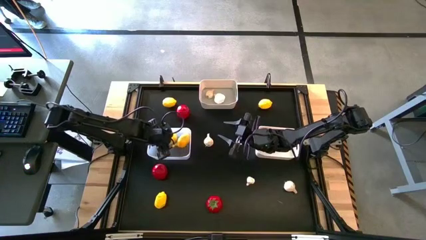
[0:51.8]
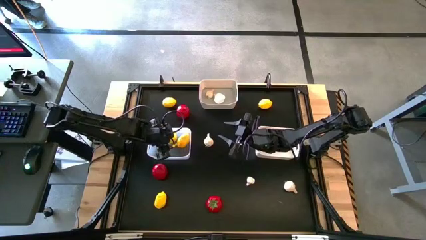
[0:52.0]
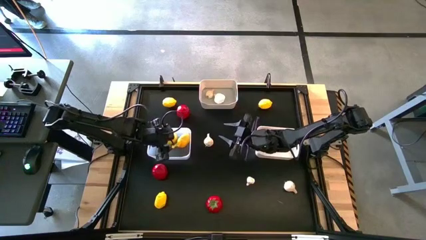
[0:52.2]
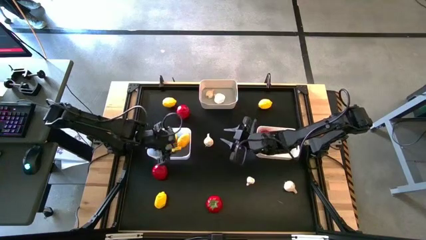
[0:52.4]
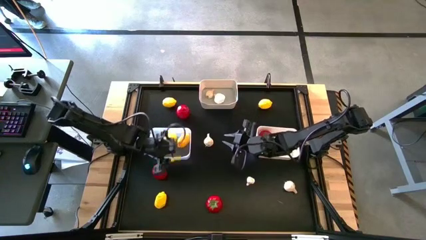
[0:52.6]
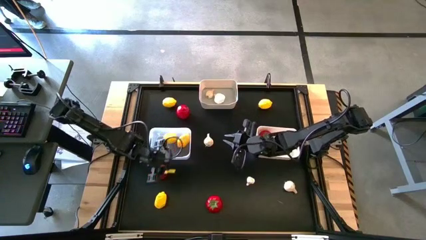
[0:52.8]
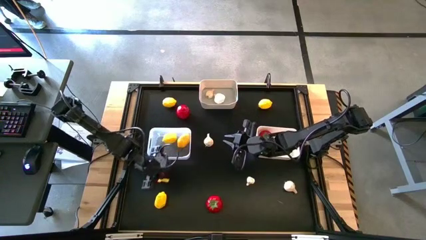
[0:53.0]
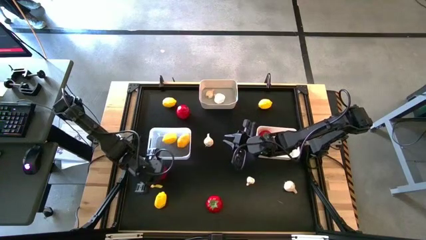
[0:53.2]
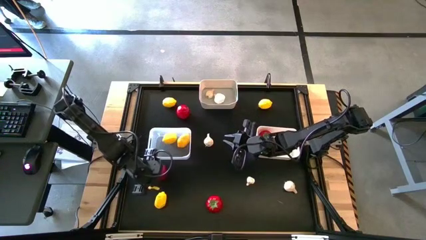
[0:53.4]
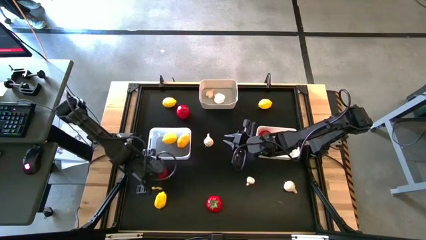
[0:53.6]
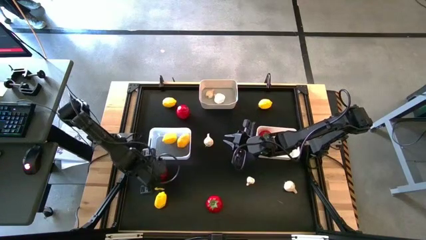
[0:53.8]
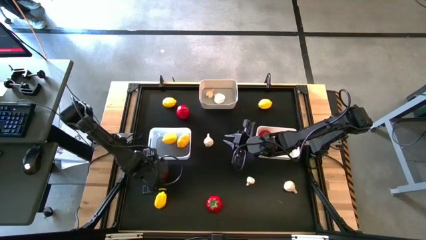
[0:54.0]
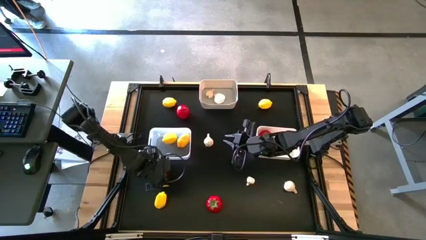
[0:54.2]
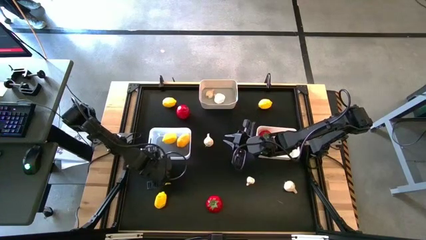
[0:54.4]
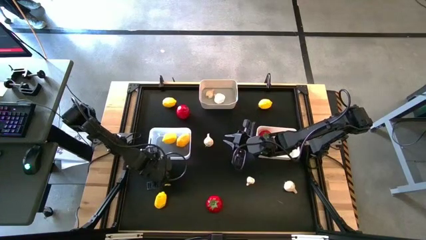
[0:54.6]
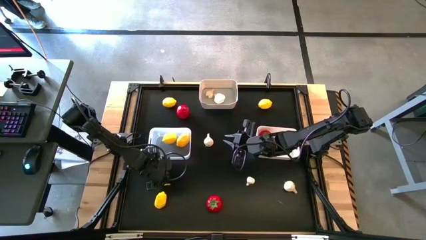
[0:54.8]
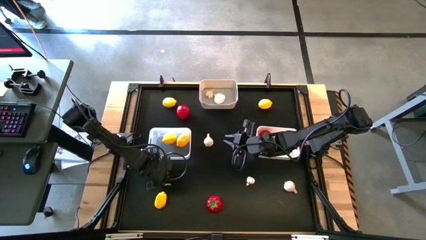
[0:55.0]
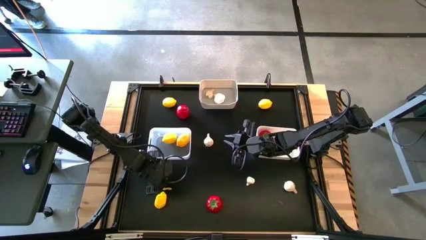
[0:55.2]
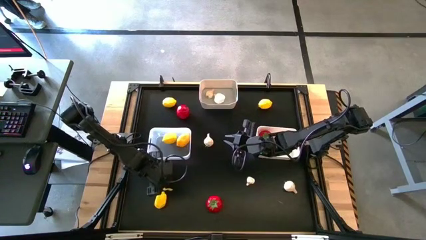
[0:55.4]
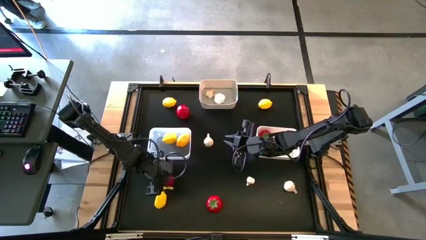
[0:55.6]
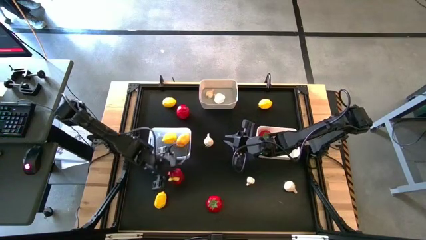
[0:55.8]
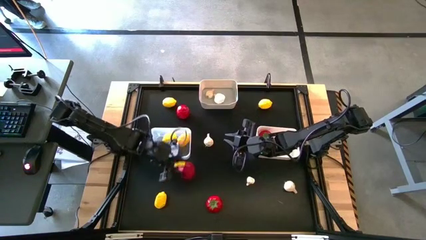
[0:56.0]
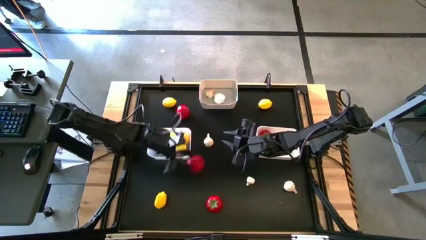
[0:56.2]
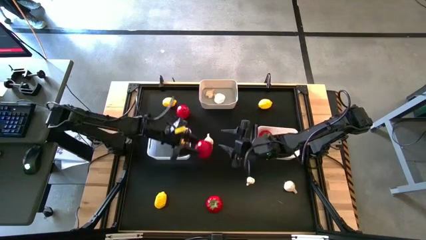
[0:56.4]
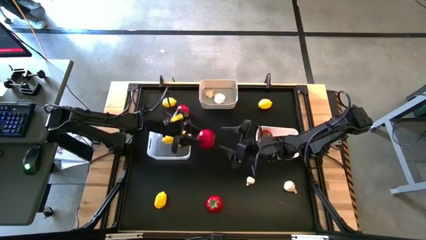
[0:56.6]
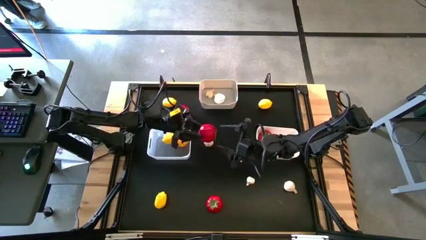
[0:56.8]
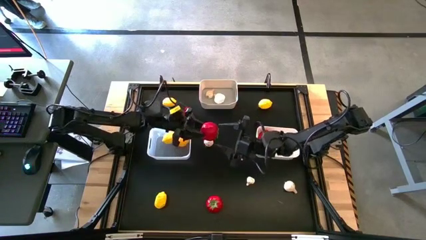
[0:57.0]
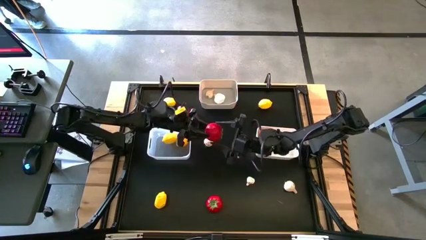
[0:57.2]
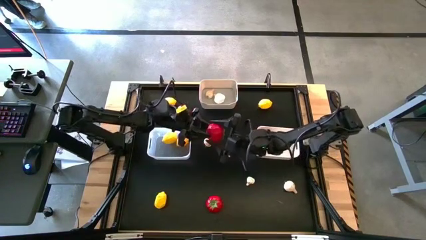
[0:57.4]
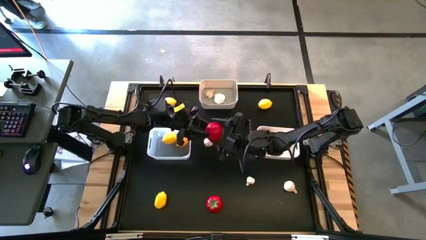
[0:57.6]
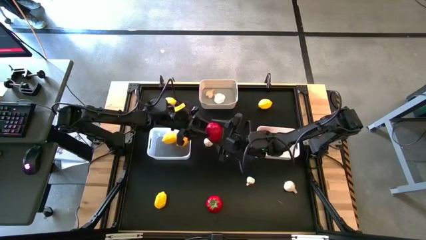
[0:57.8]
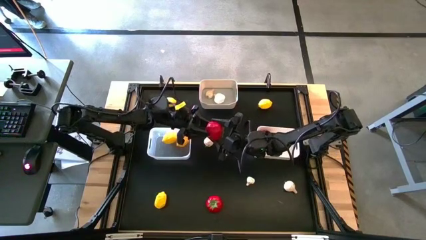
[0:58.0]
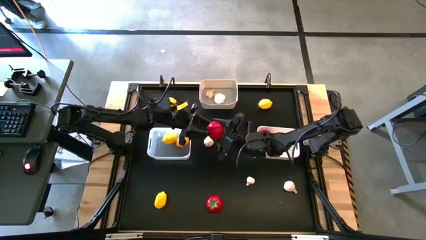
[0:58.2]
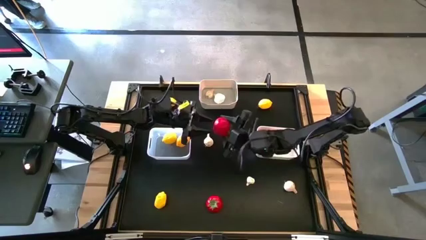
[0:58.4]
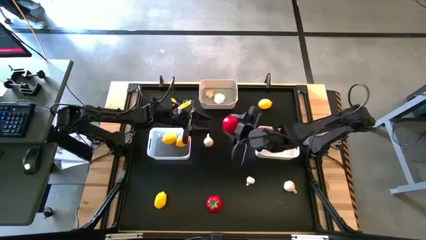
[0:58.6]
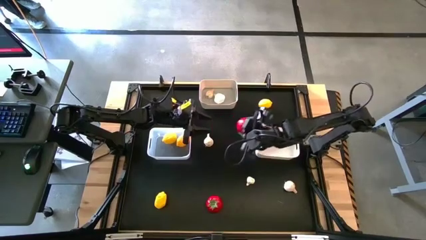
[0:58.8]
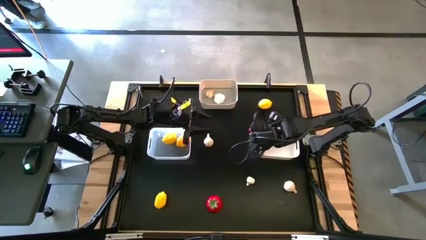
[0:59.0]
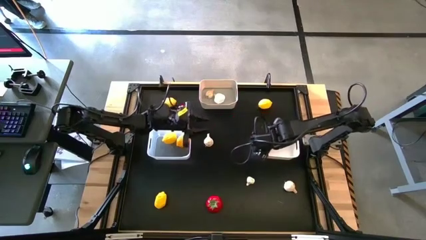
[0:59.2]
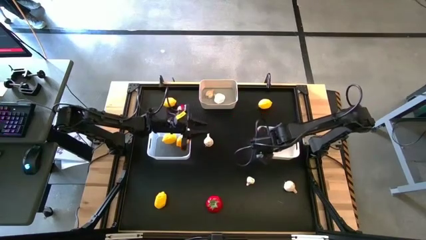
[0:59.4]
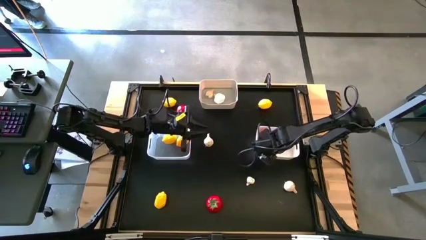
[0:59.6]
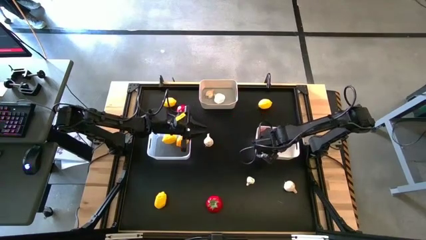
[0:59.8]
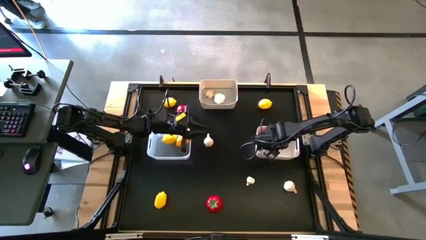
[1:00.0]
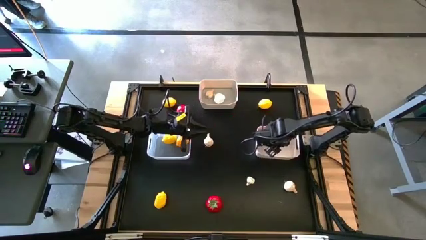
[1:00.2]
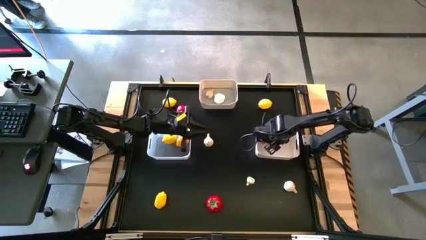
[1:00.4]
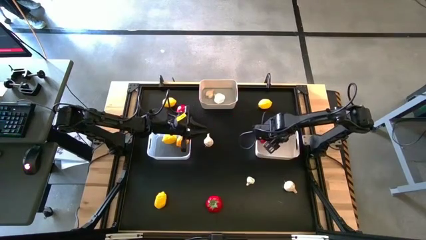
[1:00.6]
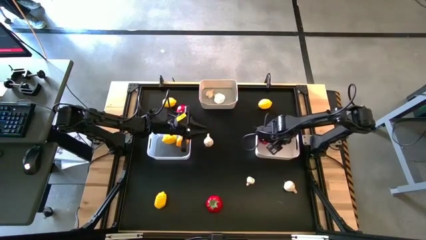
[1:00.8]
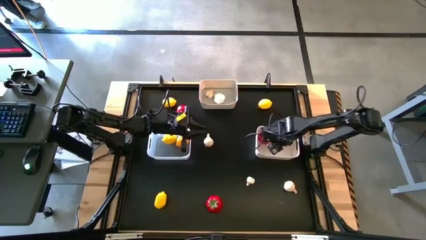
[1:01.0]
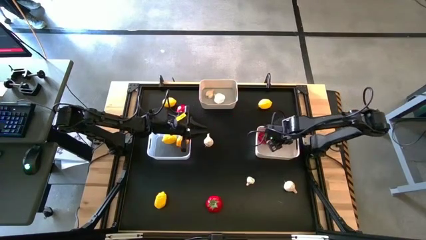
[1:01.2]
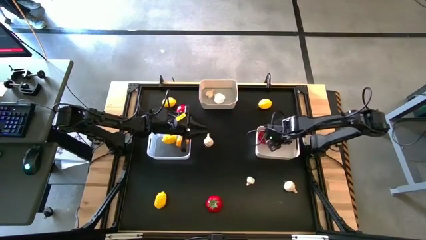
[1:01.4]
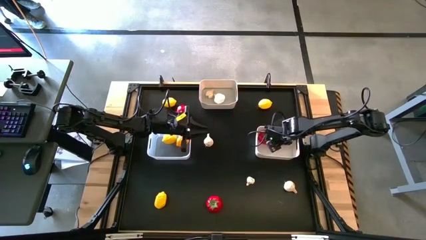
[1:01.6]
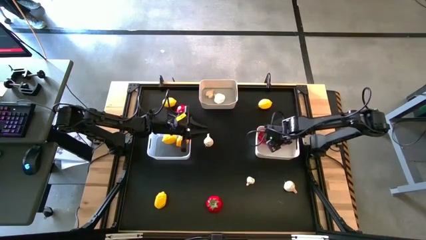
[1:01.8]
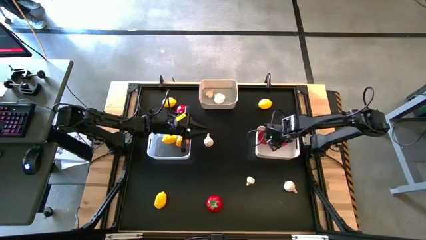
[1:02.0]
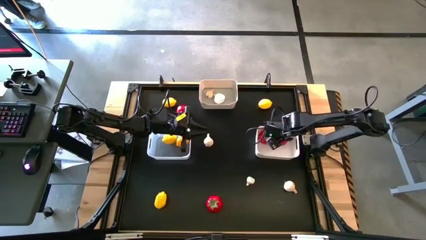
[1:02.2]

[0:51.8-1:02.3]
Task: Sort produce into baskets
Put the red tomato into the bottom right white bin

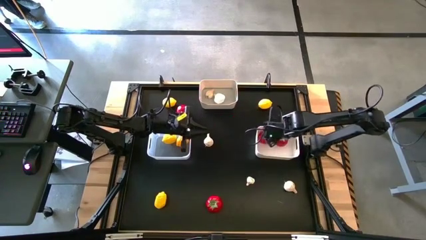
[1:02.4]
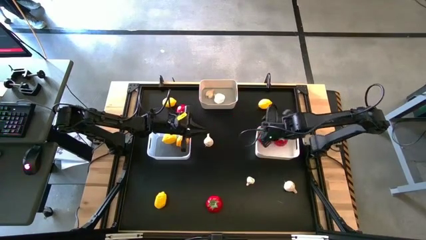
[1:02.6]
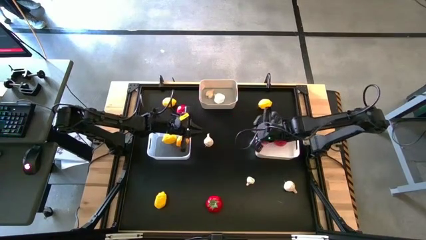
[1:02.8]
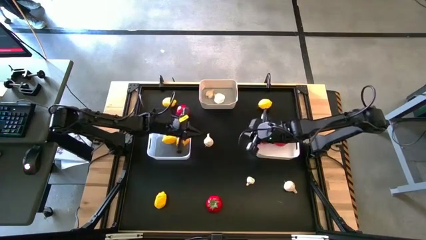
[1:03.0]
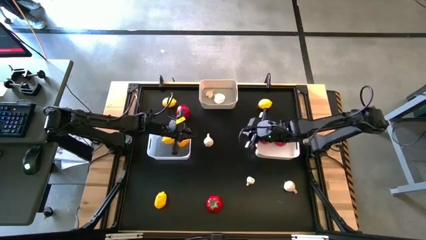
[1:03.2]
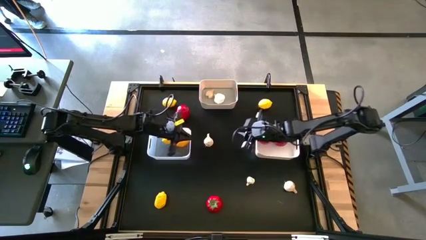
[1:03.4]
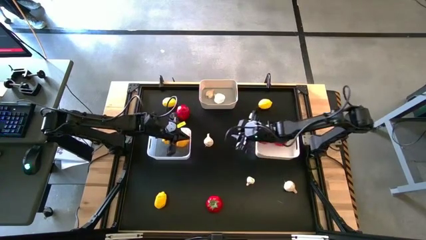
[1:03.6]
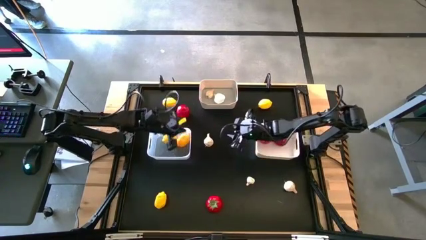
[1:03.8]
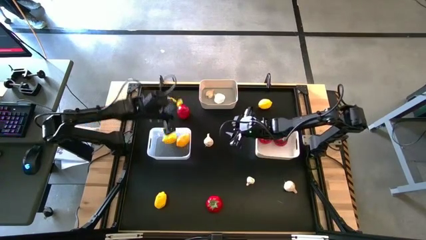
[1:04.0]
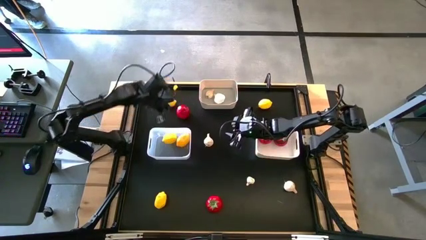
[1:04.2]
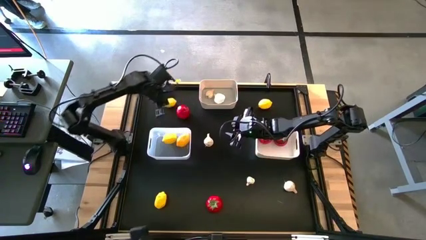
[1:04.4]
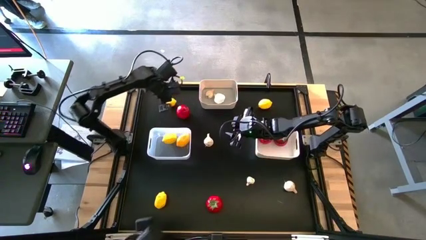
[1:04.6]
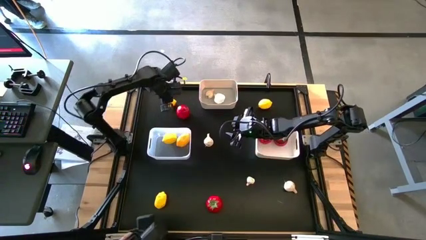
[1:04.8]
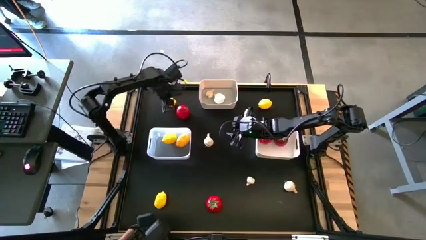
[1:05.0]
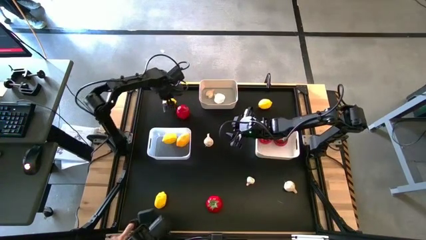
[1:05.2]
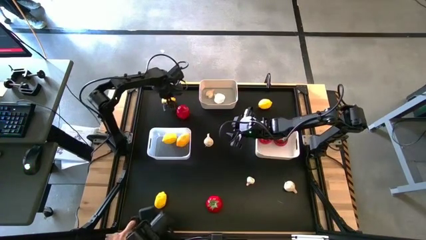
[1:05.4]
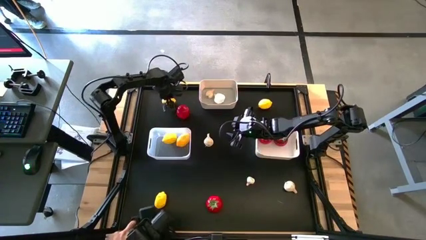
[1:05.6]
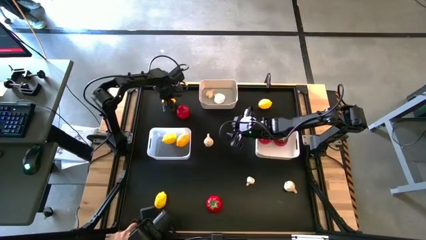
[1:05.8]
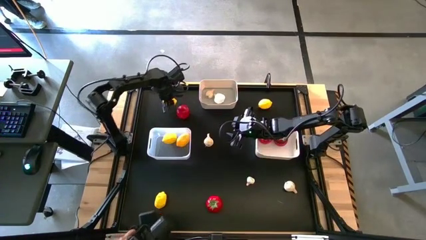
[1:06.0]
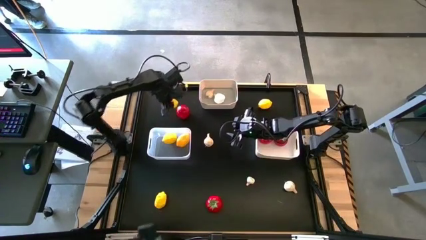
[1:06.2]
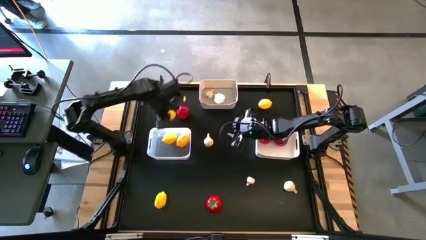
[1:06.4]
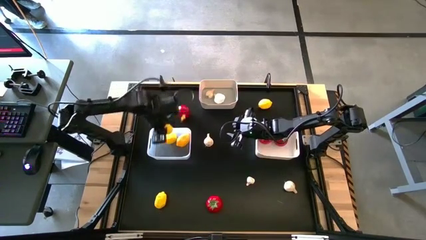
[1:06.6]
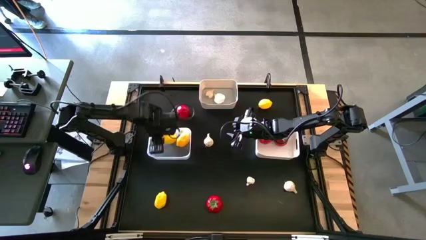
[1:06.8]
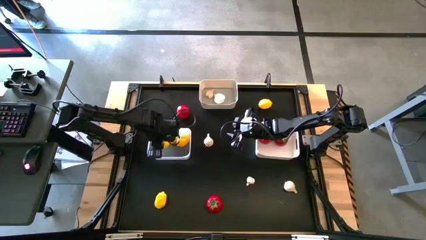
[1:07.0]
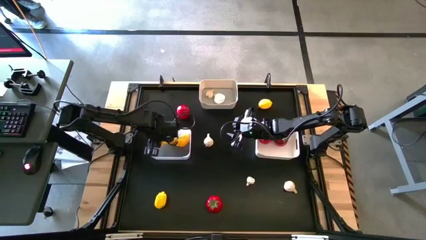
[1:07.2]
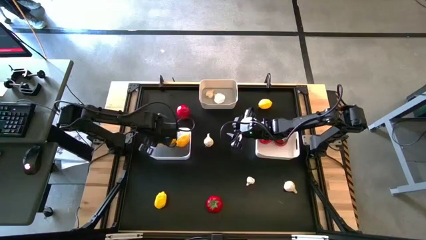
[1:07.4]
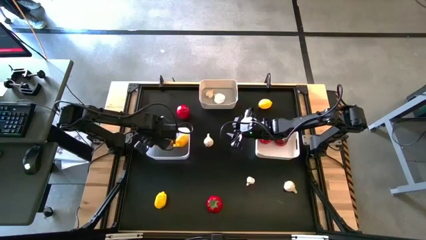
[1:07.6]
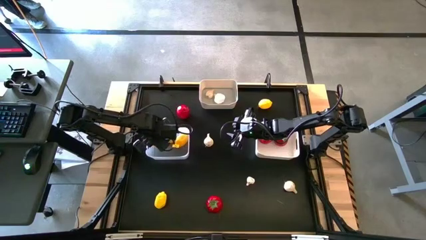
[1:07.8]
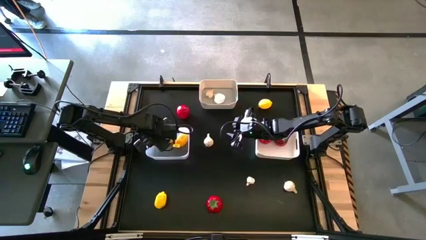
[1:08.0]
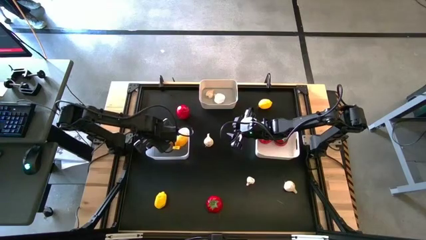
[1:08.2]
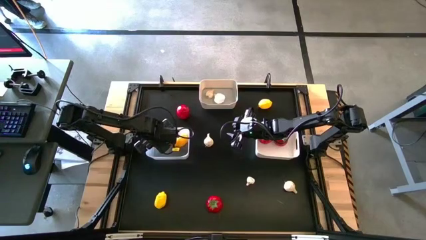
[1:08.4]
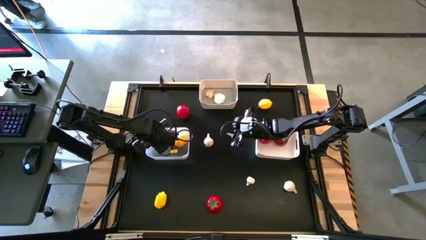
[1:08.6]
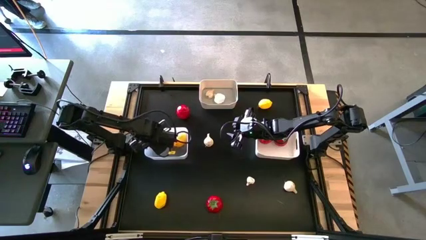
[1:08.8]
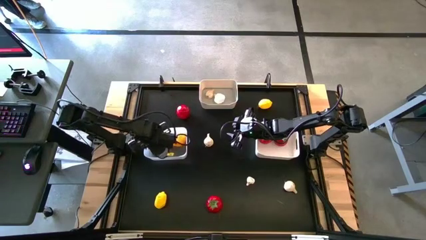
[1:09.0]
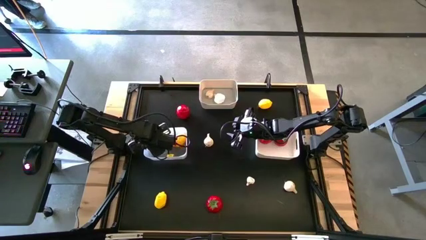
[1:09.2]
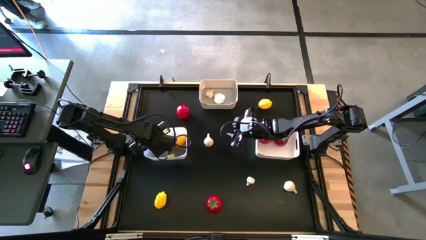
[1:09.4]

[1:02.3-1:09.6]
Put the yellow lemon into the transparent bin
